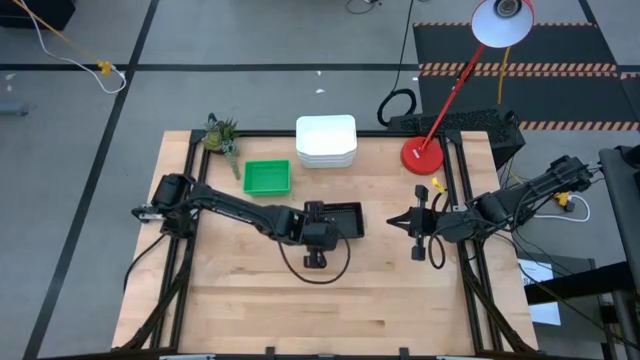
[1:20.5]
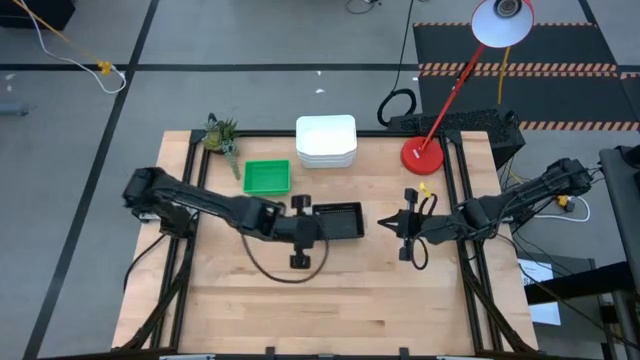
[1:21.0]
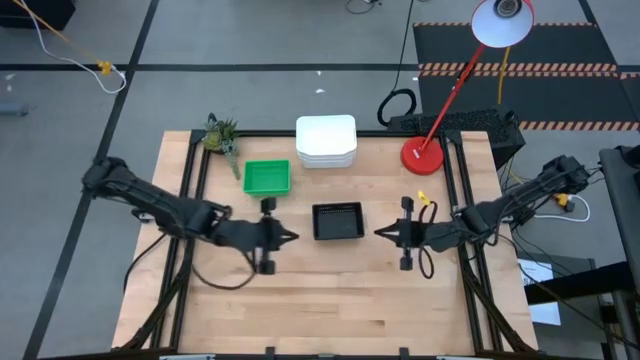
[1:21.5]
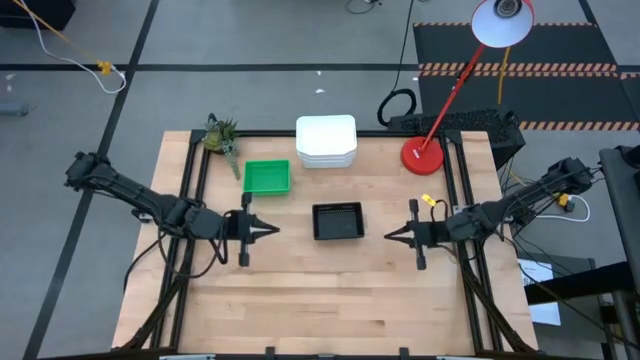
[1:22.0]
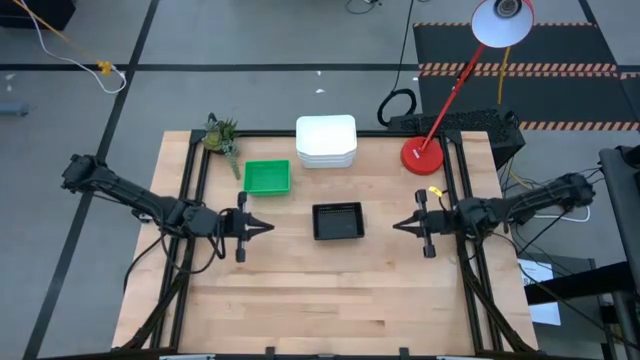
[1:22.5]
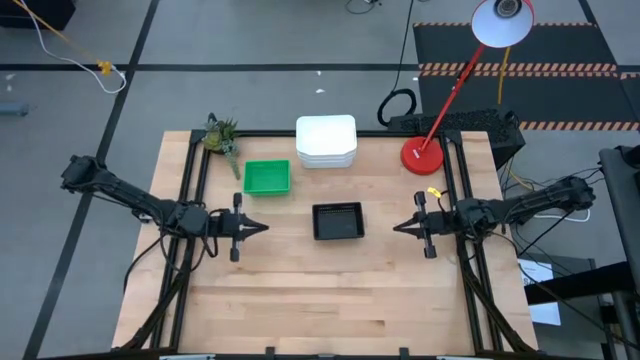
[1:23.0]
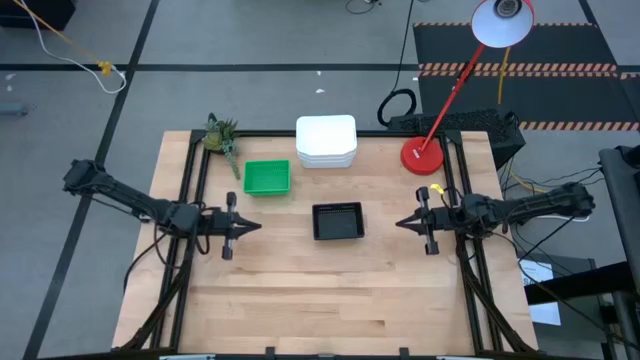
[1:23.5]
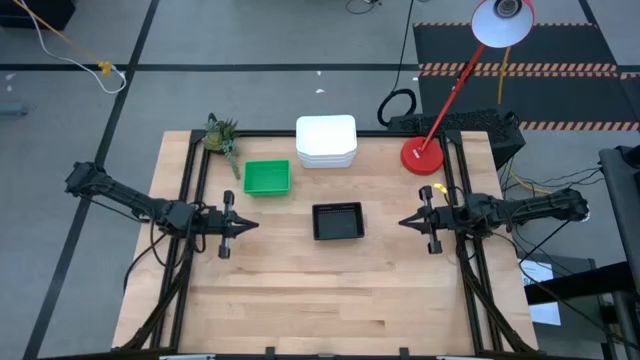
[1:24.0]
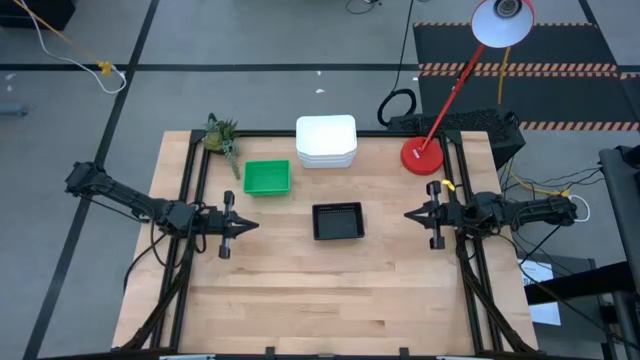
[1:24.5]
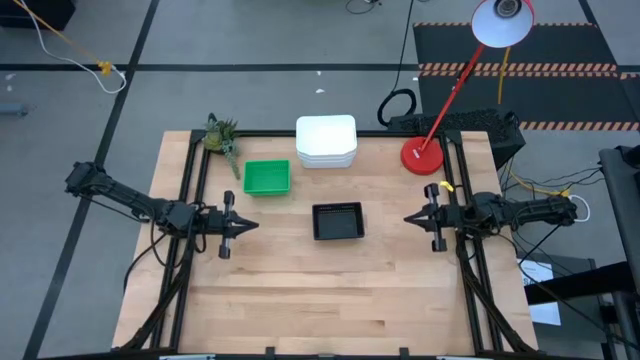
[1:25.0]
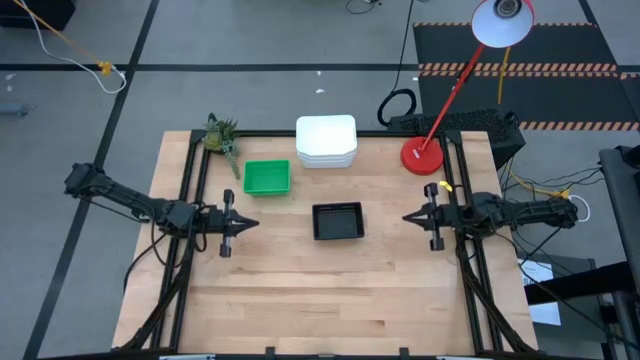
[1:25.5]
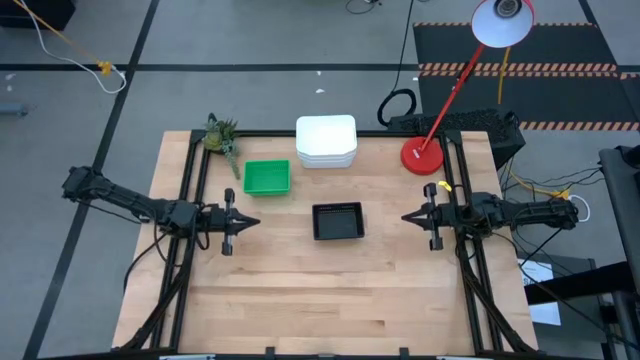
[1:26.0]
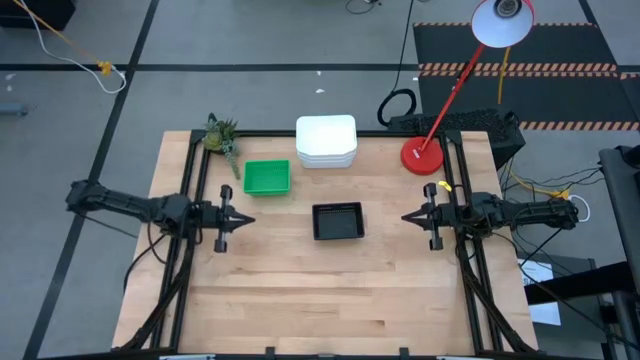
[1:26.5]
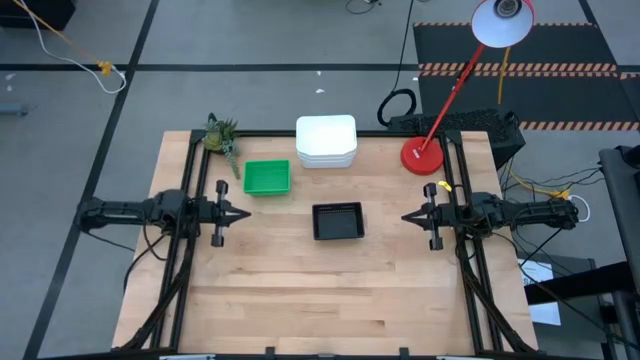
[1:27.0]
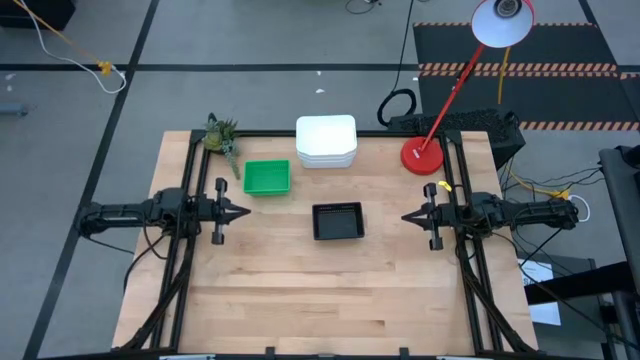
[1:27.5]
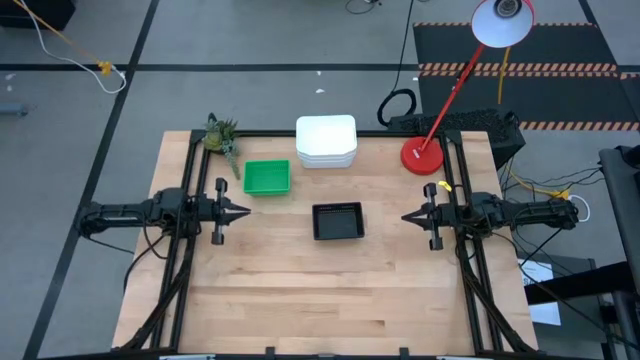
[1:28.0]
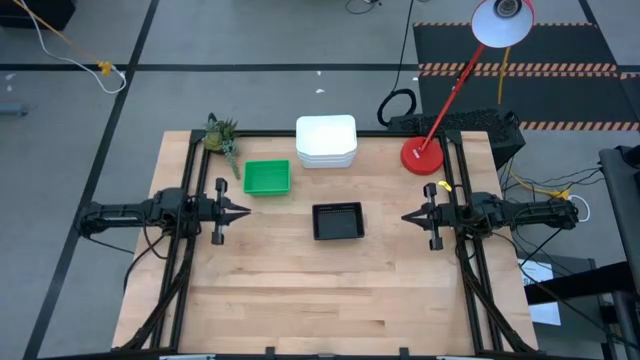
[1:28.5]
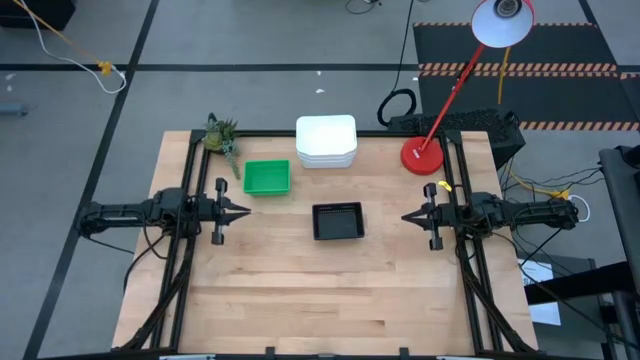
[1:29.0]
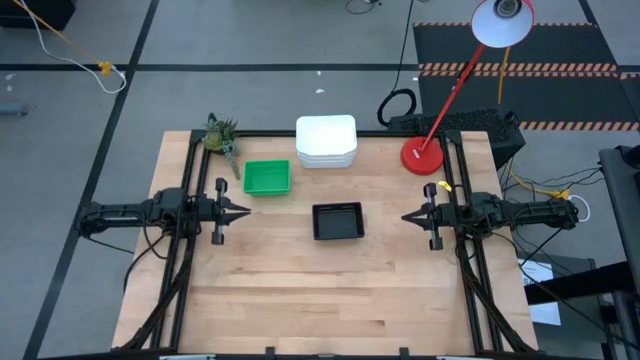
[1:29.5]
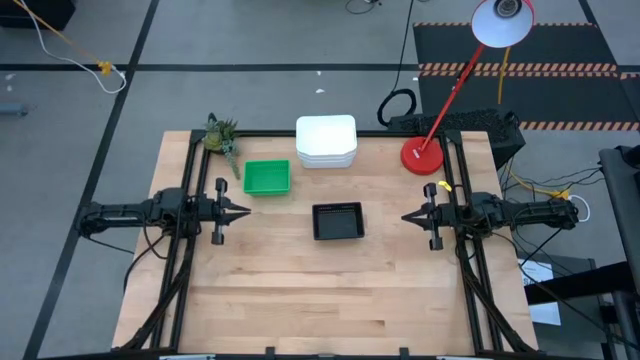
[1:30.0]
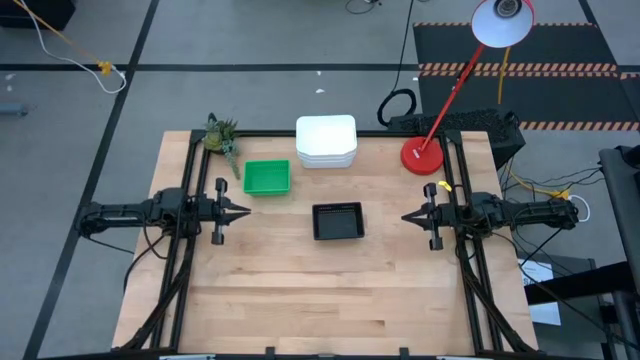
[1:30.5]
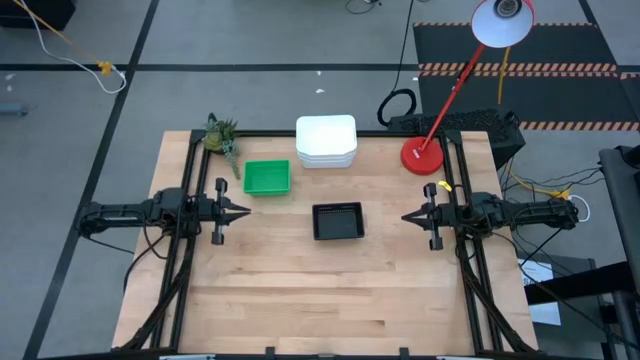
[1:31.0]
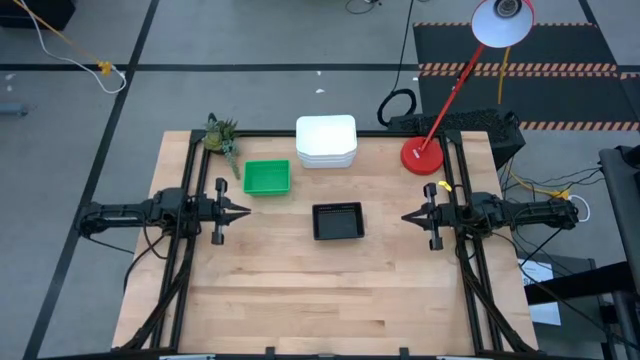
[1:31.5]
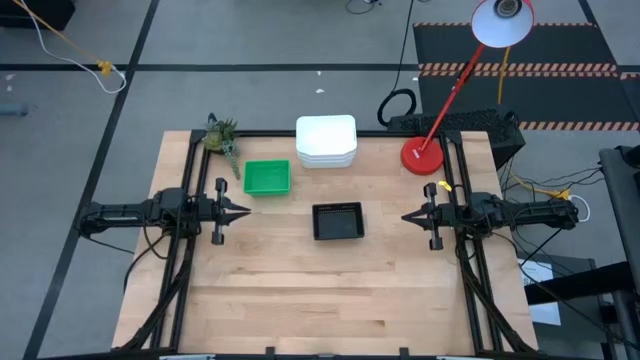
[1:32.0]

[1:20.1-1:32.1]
Return to Home Position
